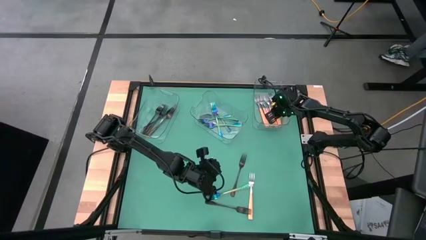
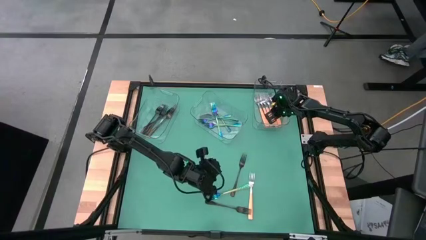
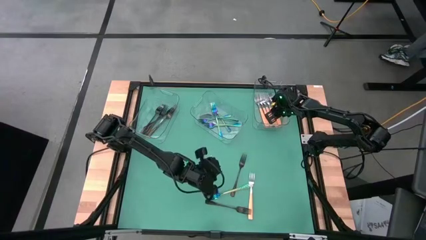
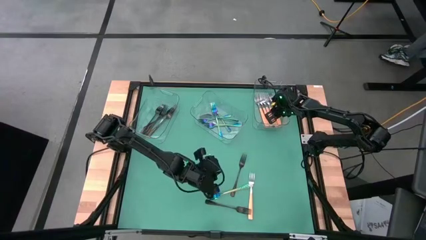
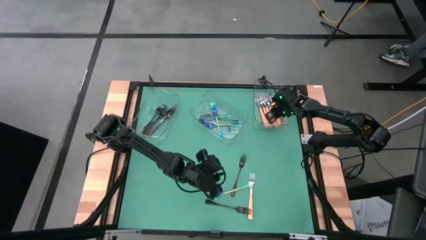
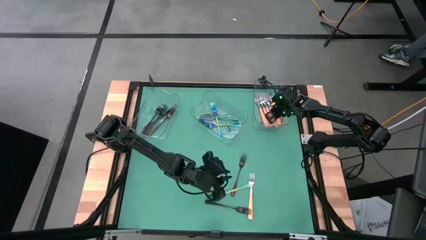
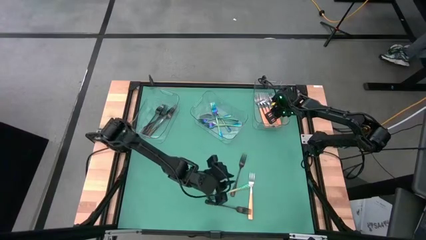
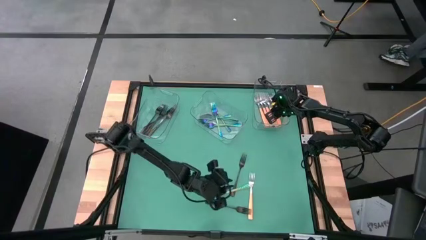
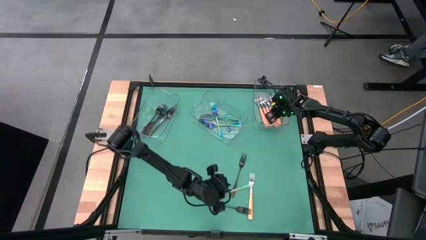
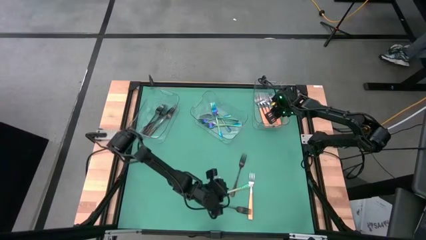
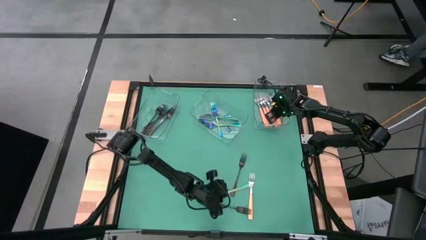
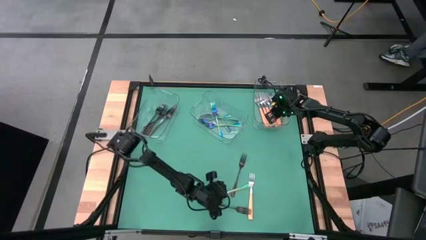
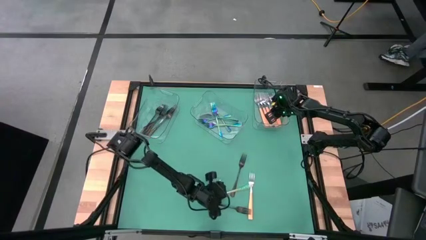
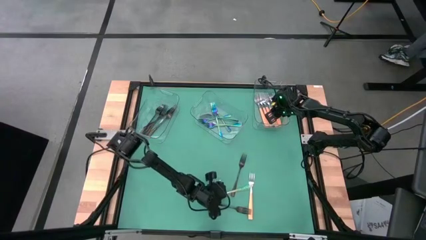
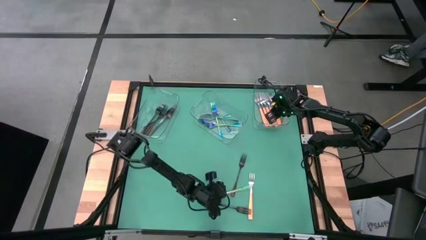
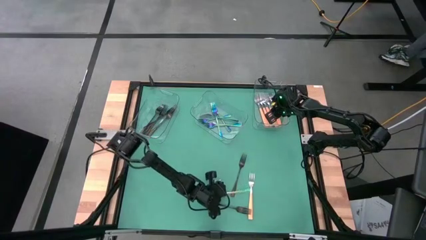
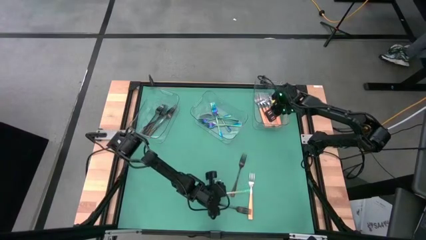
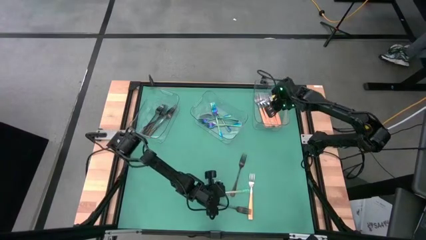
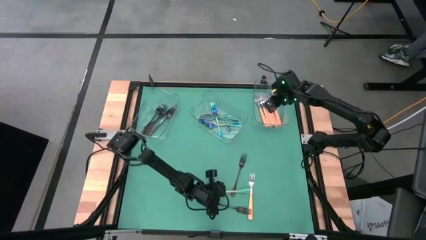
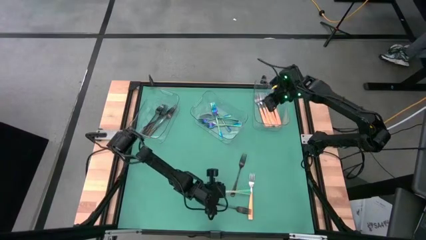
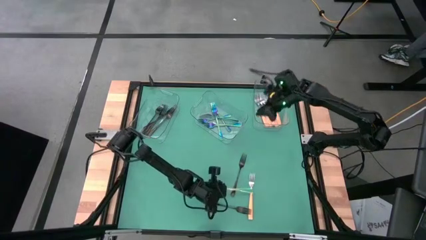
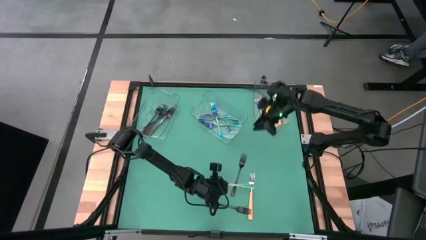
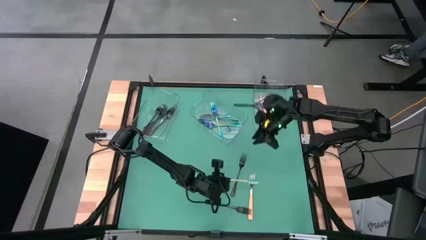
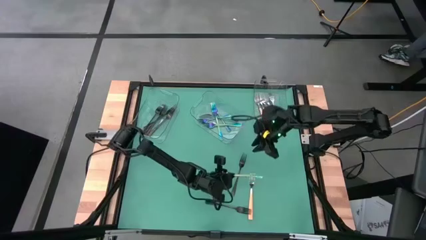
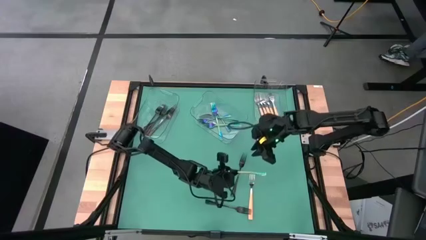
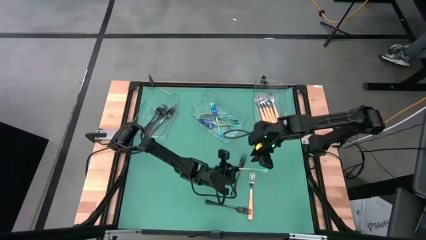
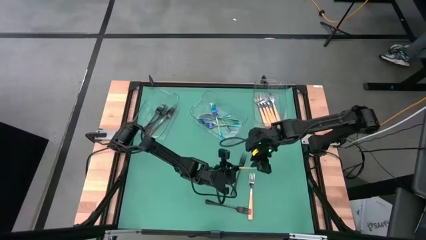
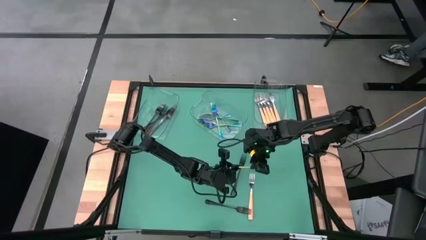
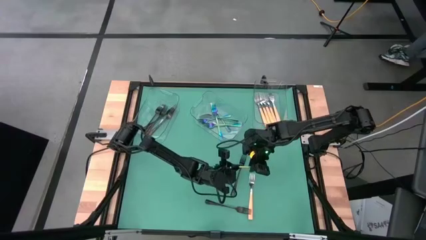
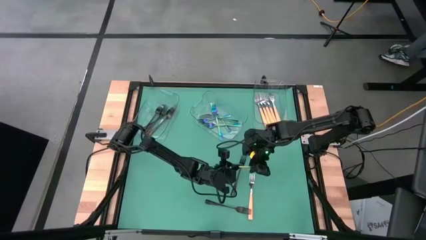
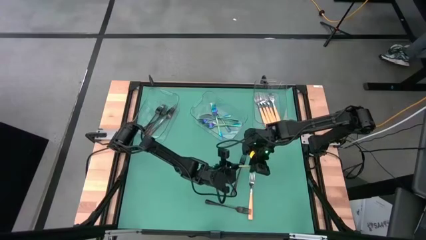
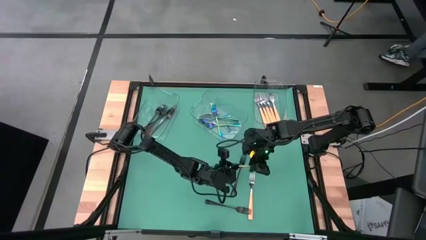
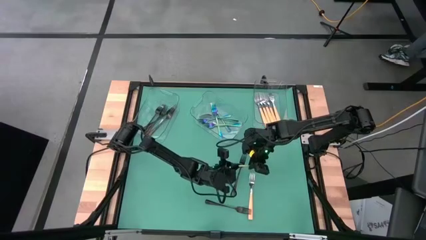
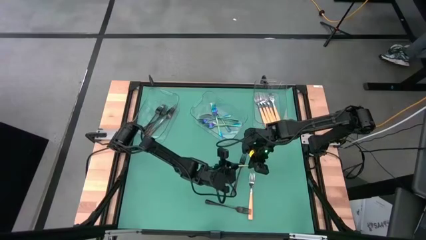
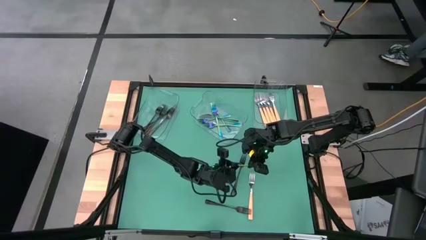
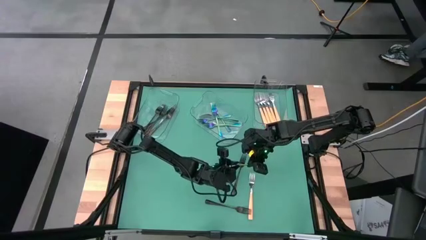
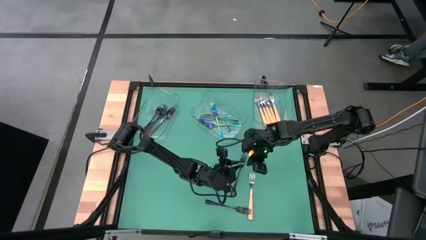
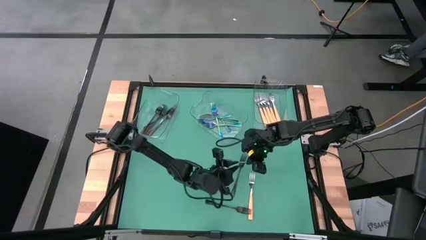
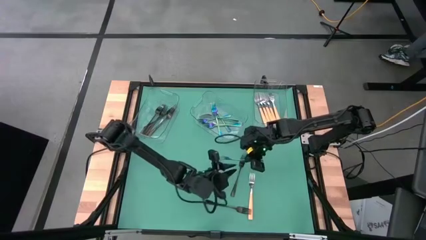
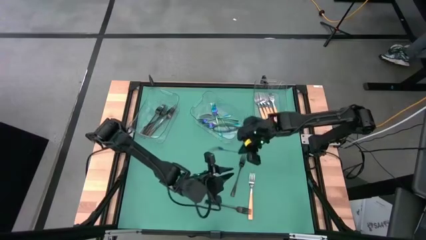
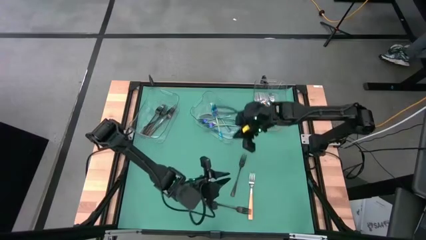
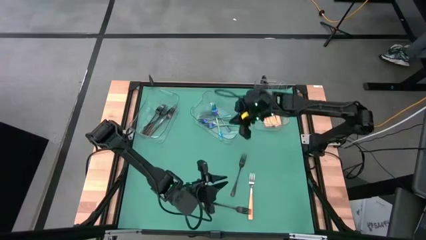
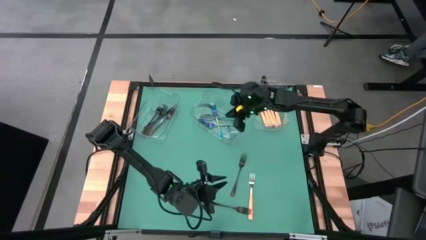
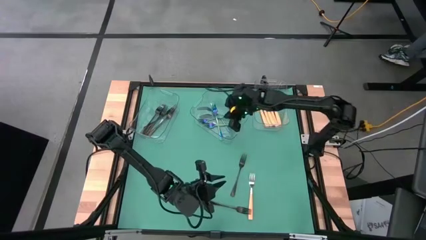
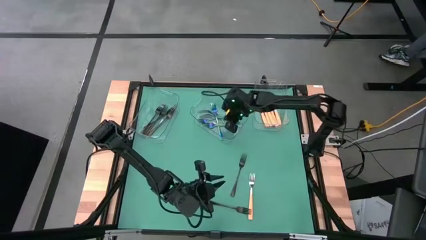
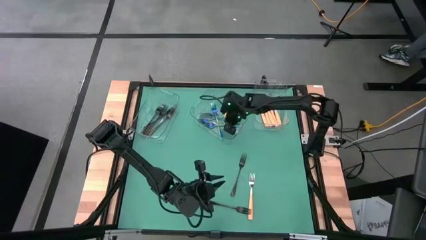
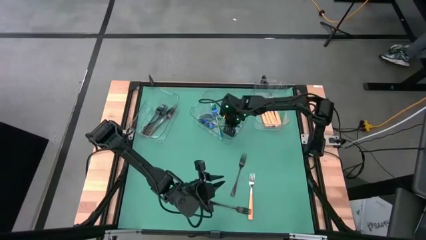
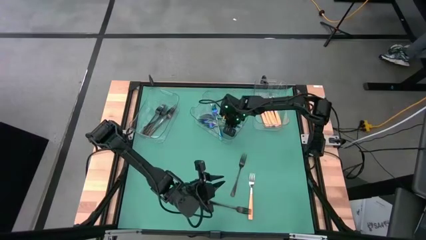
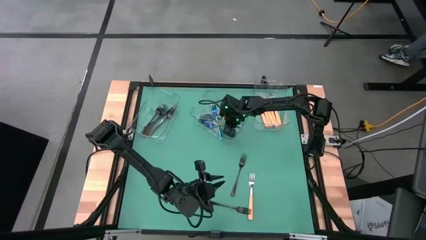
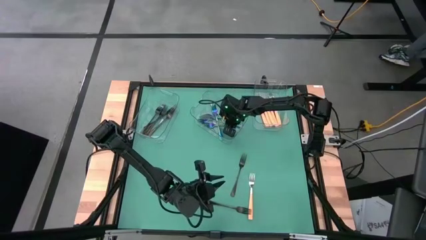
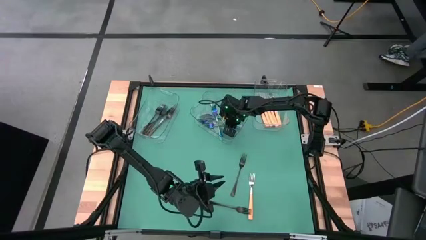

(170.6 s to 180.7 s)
Task: Sort silverware by color (type)
Put the blue fork into the center transparent bin

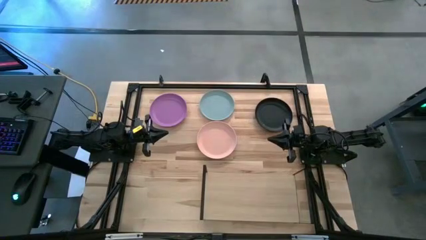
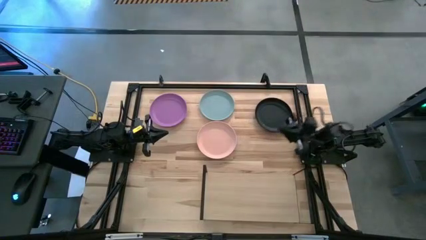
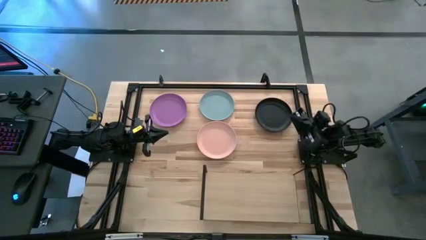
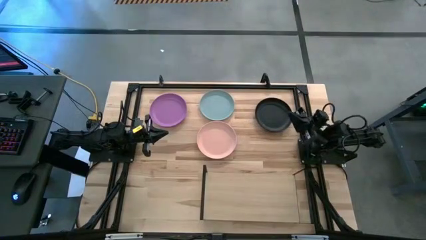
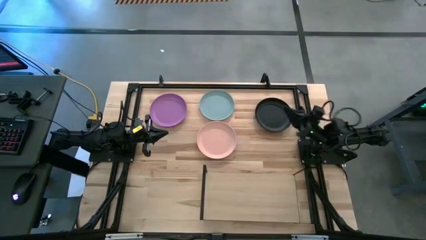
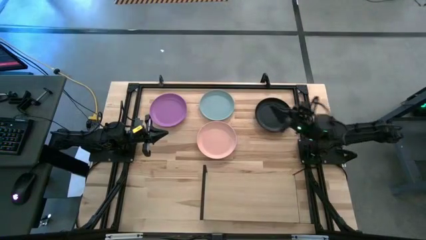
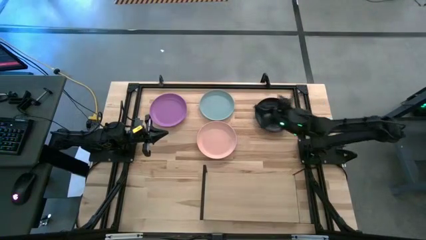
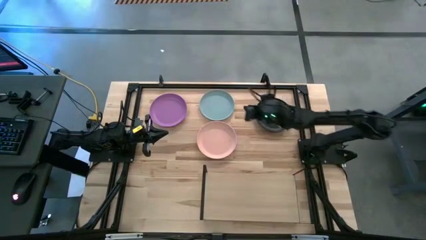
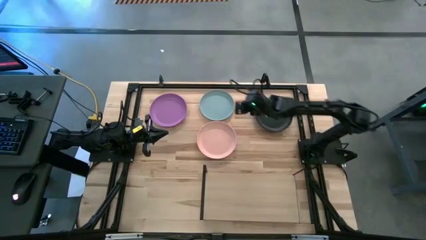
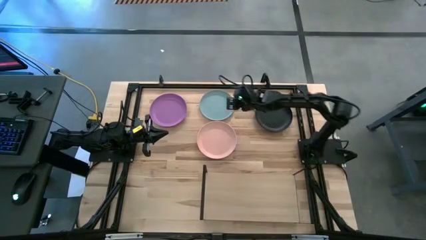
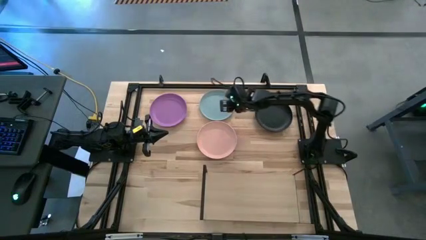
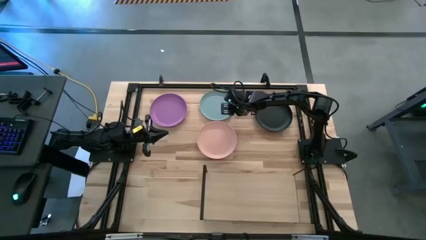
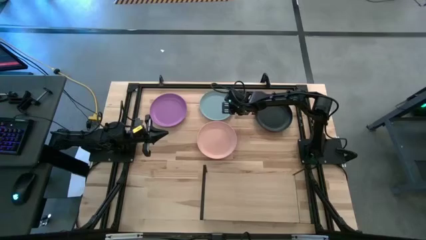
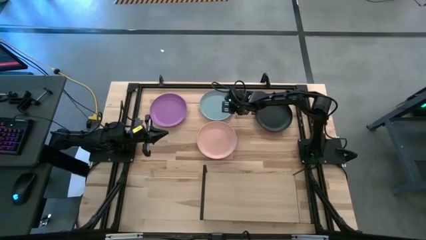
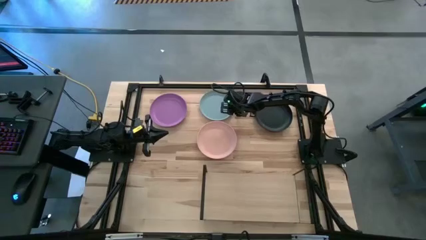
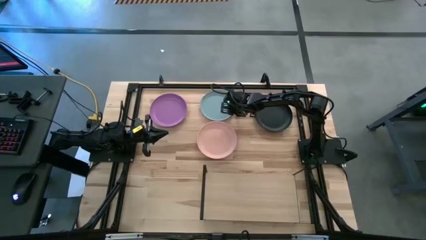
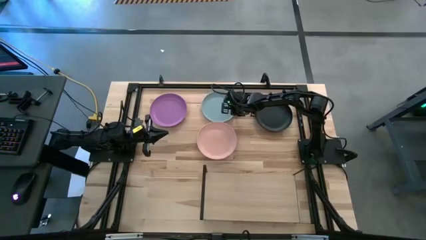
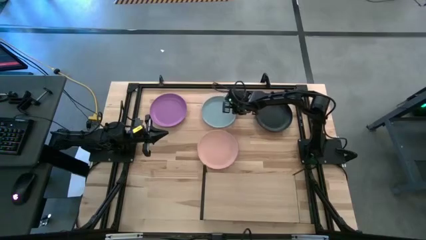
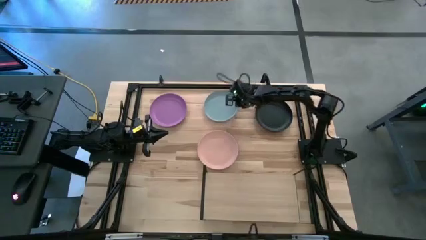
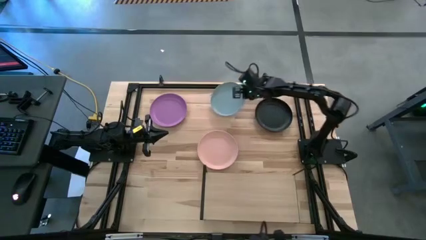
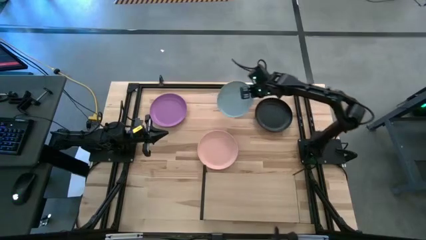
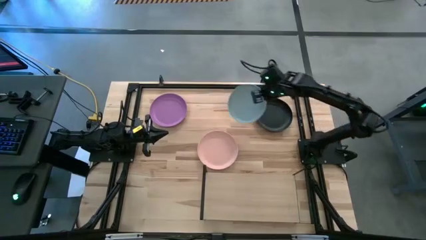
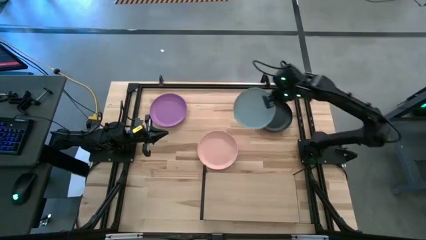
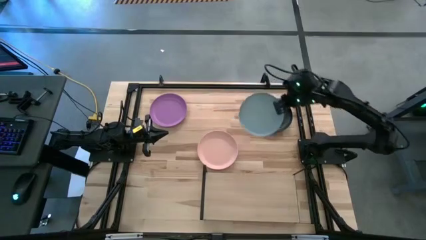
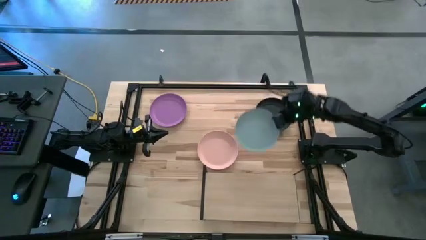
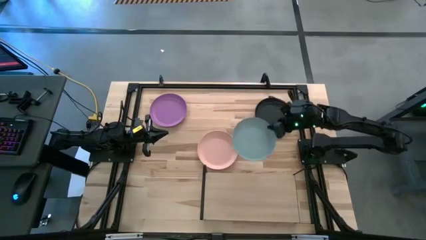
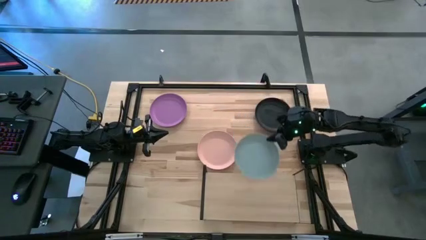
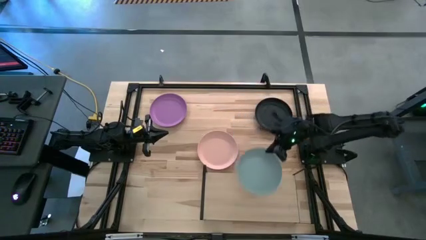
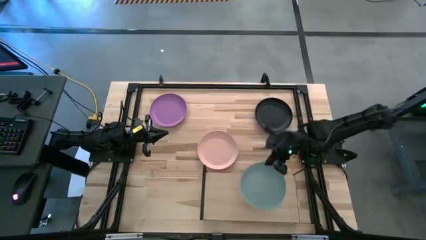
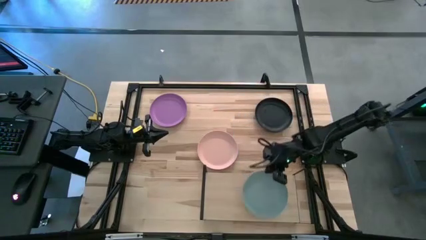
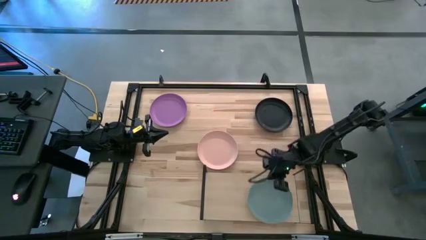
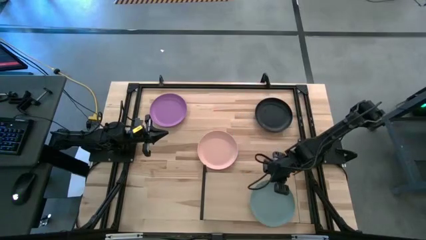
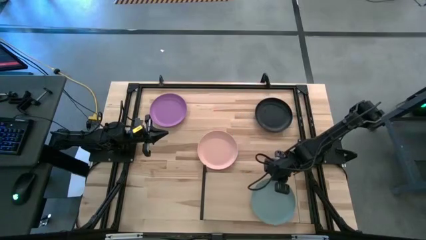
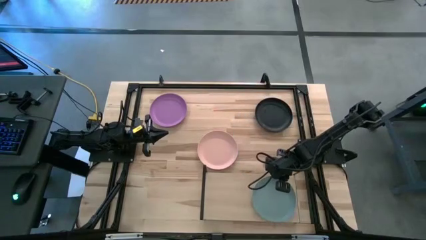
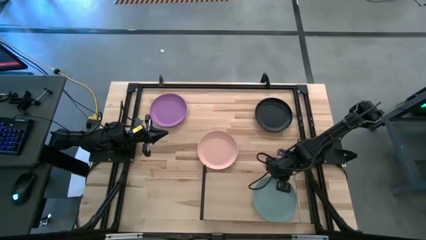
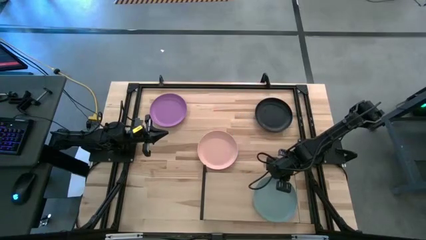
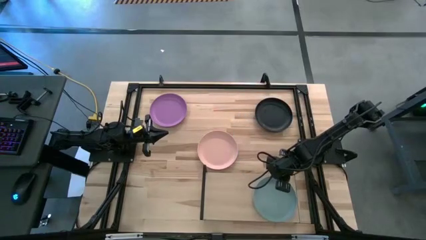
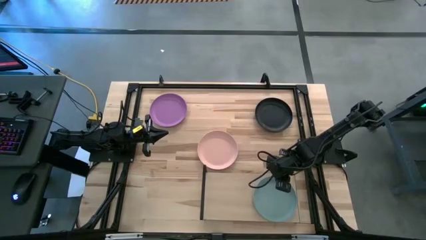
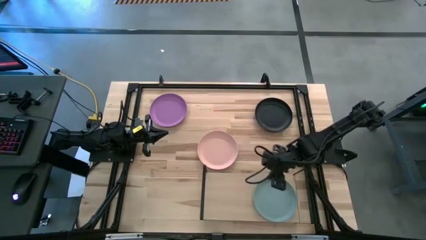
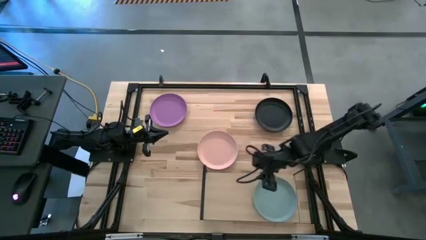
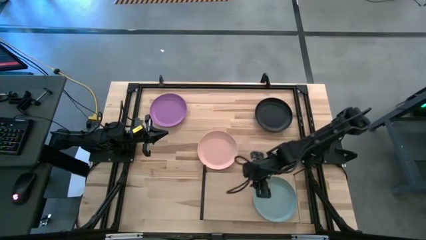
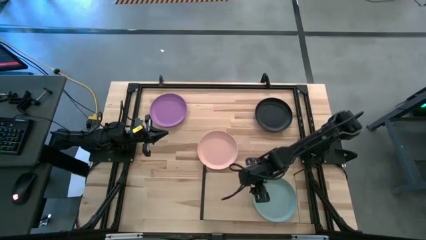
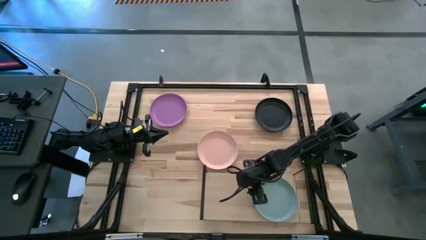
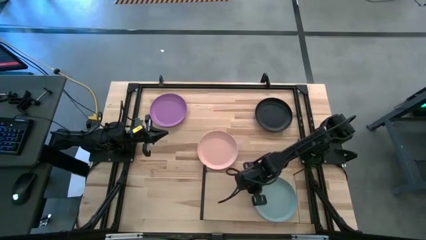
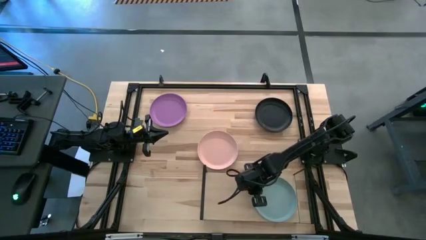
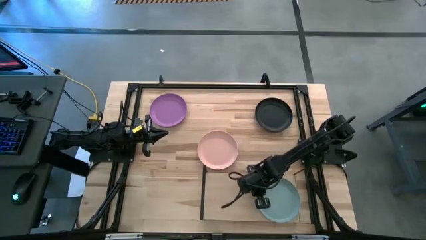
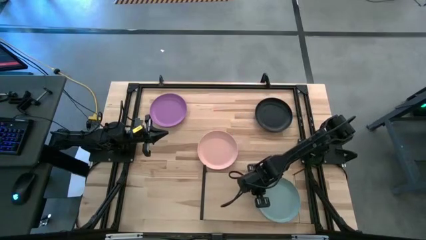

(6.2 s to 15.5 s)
Task: Place and stack plates onto a shelf
Put the blue plate on the shelf
